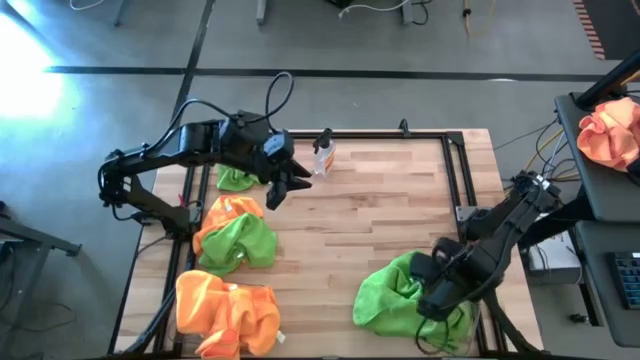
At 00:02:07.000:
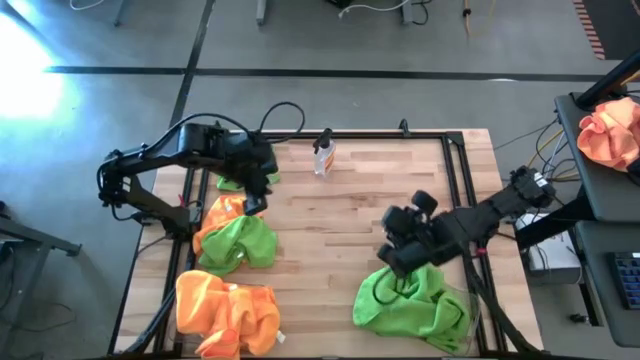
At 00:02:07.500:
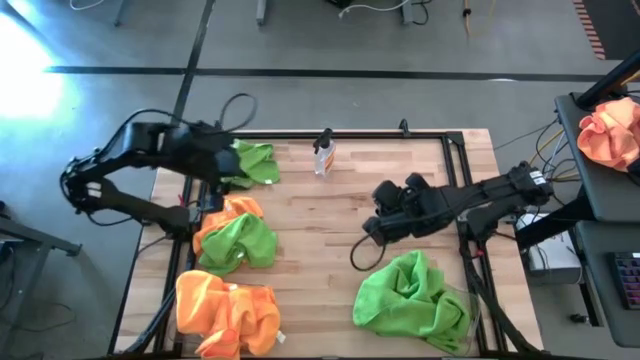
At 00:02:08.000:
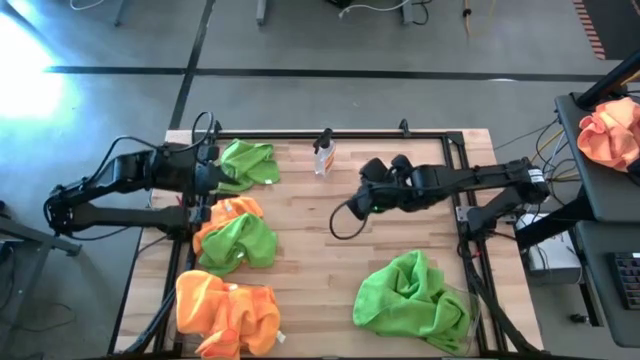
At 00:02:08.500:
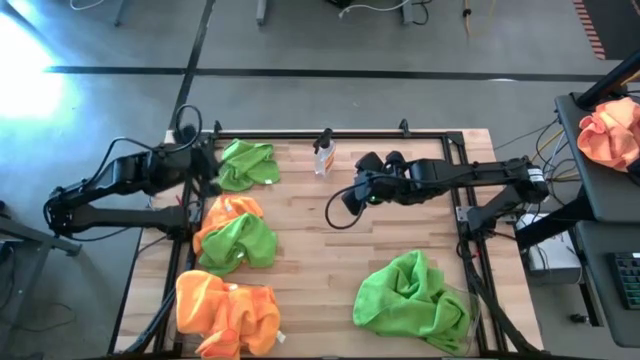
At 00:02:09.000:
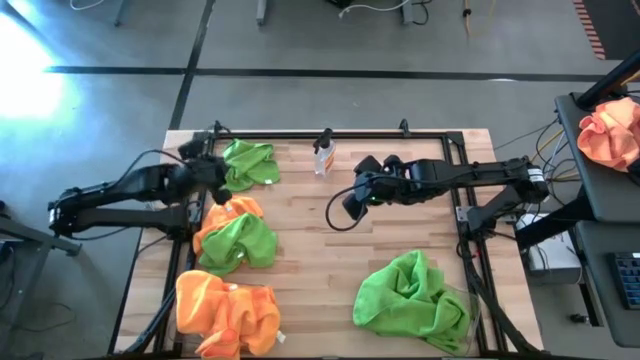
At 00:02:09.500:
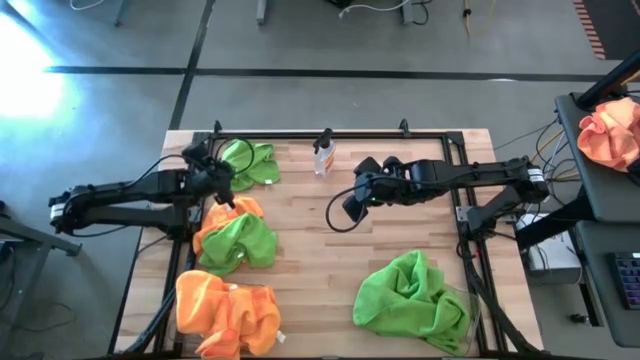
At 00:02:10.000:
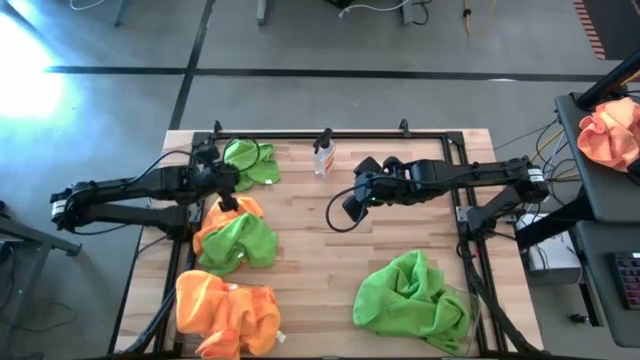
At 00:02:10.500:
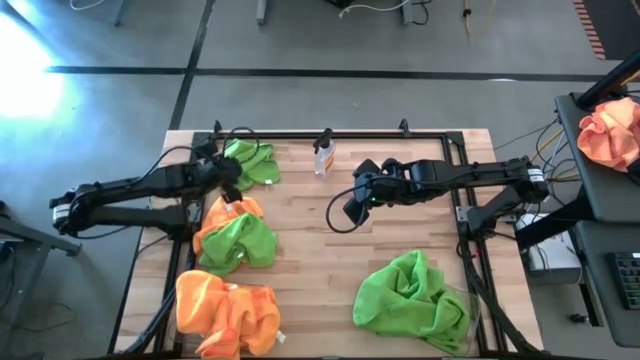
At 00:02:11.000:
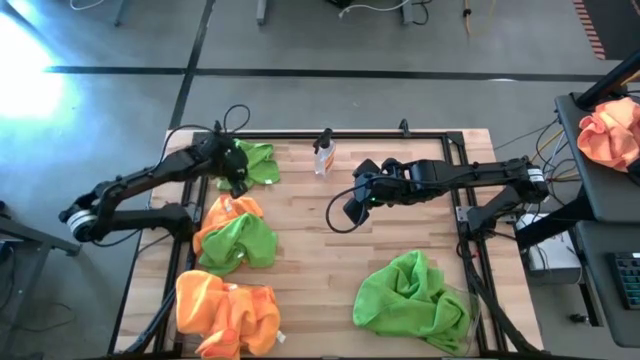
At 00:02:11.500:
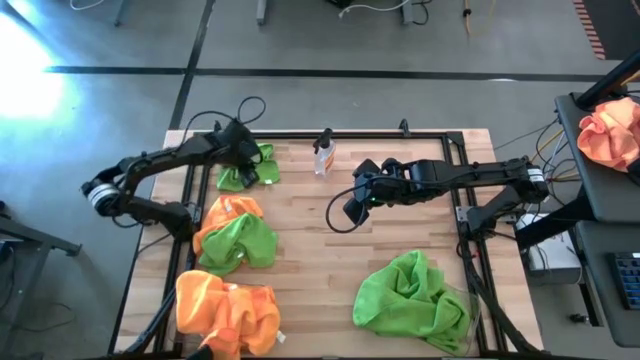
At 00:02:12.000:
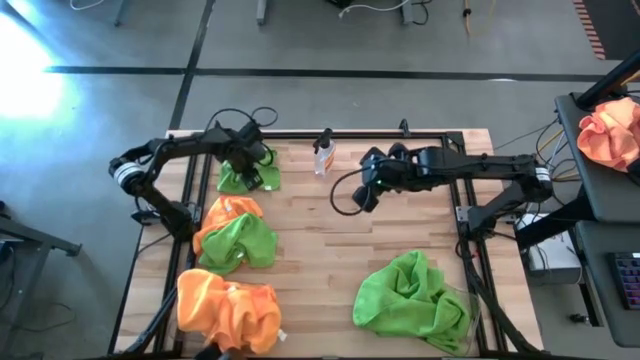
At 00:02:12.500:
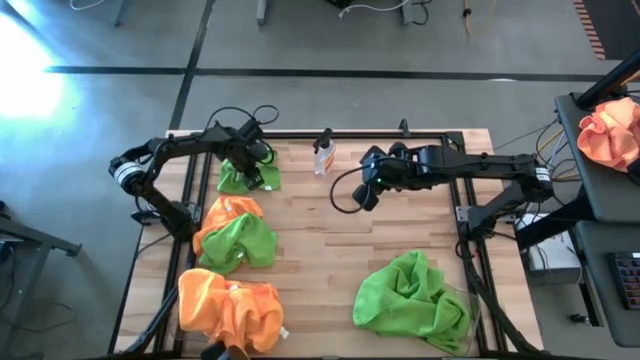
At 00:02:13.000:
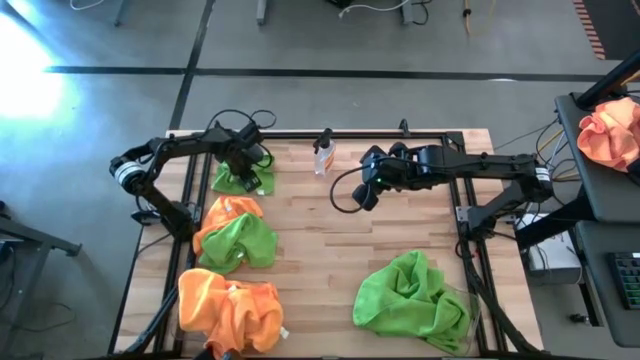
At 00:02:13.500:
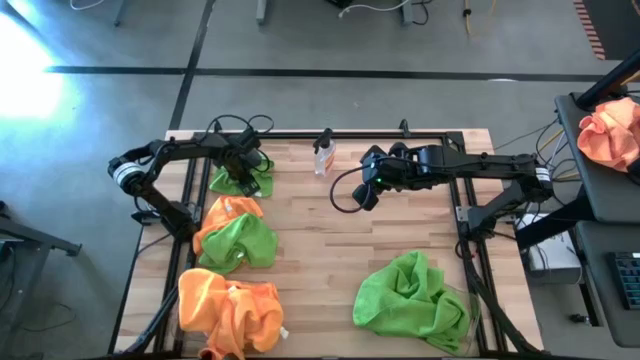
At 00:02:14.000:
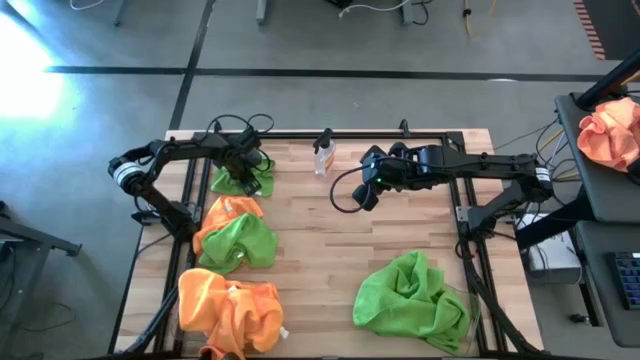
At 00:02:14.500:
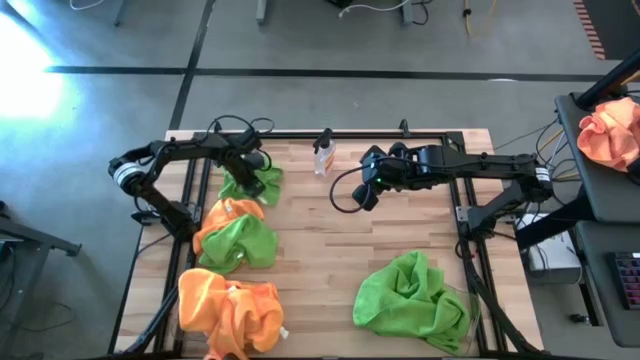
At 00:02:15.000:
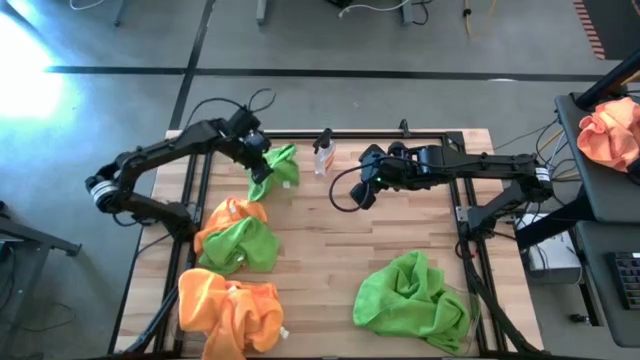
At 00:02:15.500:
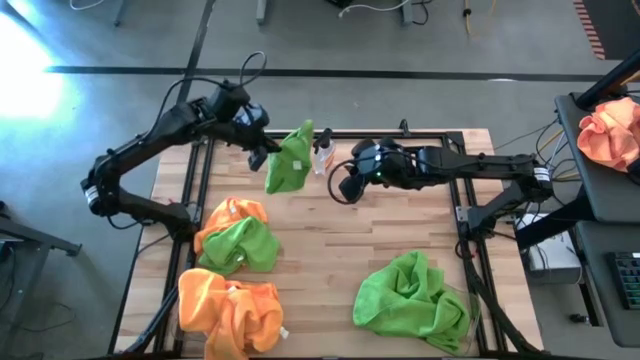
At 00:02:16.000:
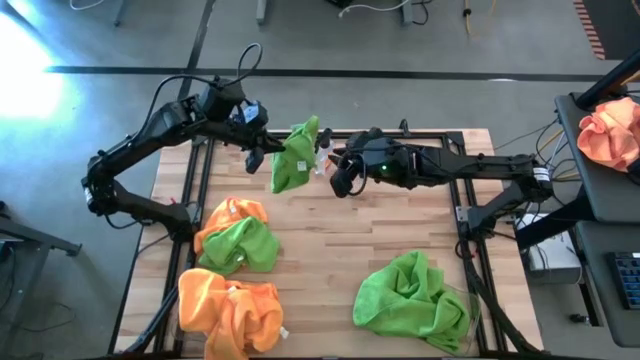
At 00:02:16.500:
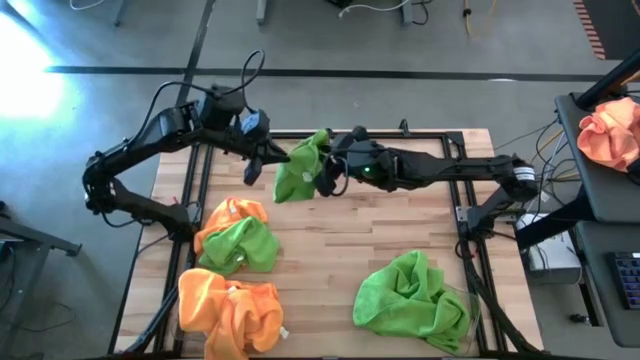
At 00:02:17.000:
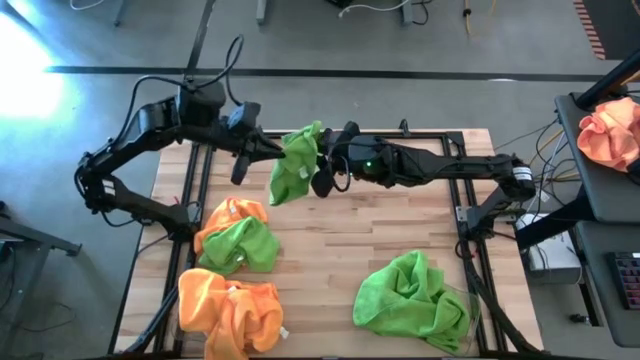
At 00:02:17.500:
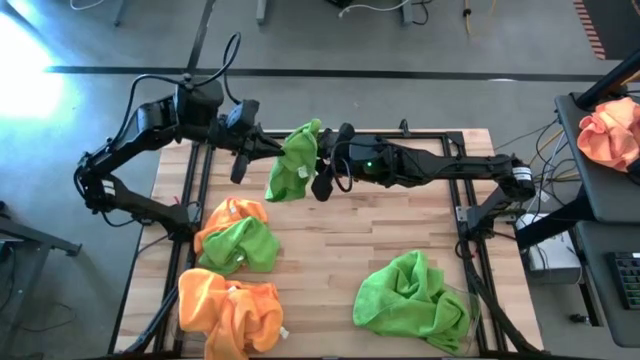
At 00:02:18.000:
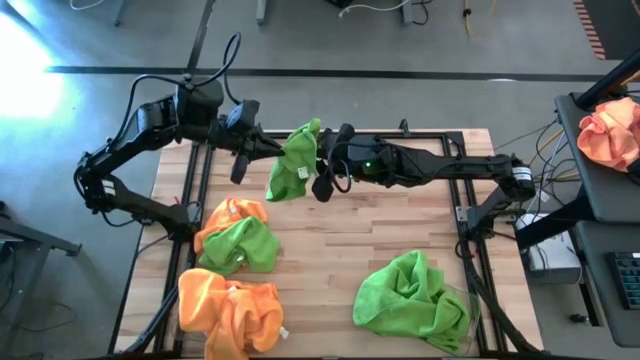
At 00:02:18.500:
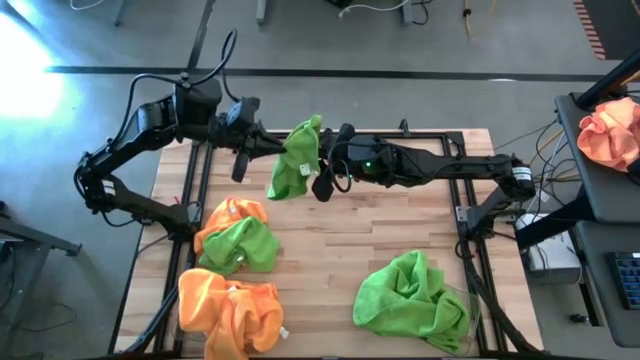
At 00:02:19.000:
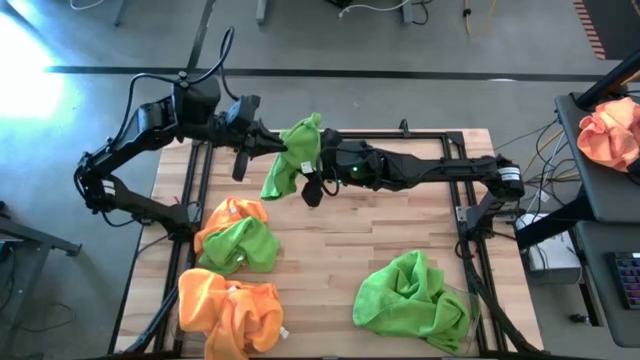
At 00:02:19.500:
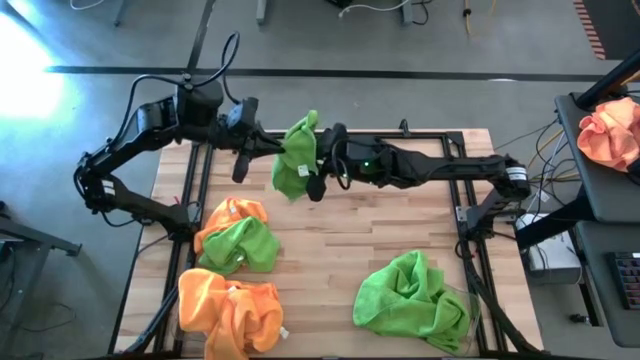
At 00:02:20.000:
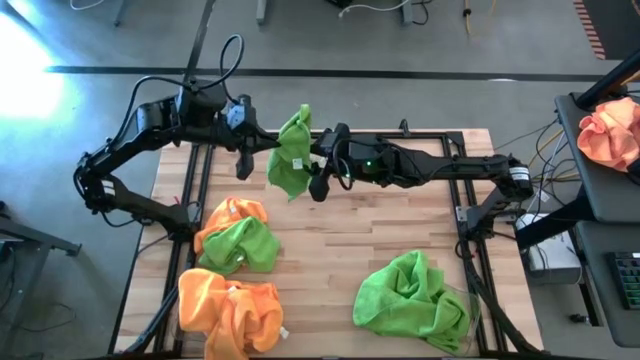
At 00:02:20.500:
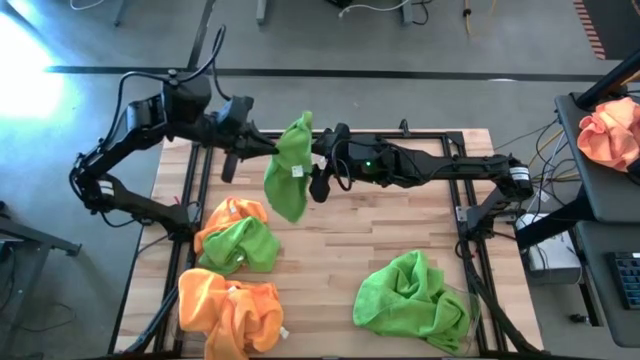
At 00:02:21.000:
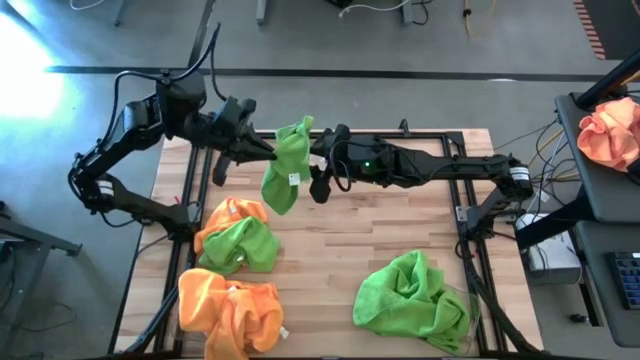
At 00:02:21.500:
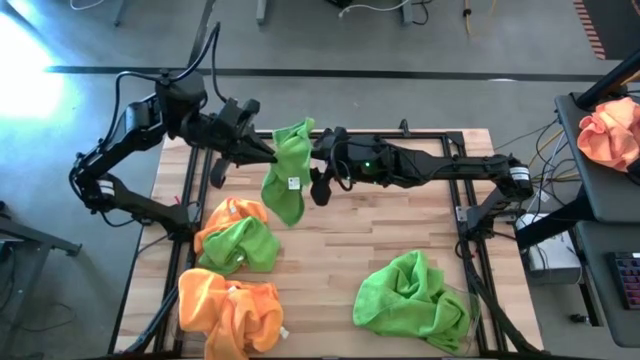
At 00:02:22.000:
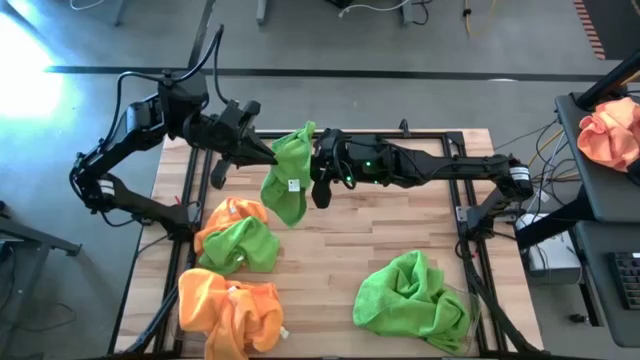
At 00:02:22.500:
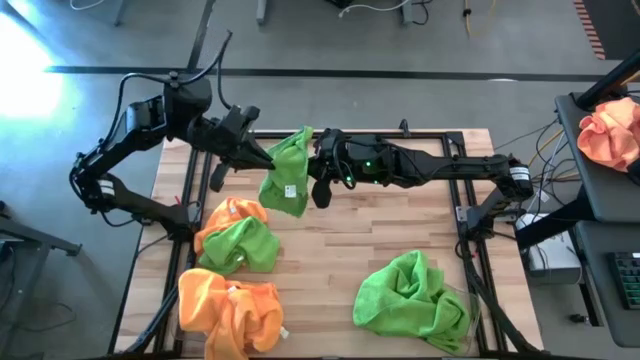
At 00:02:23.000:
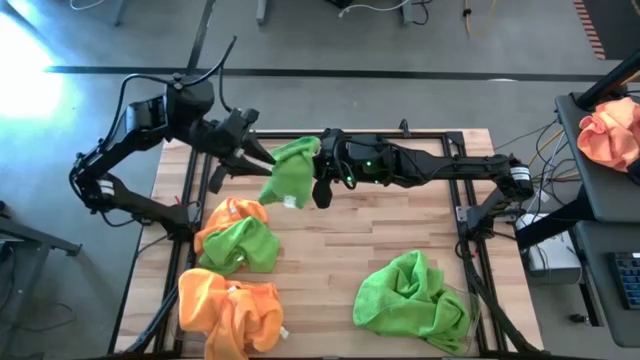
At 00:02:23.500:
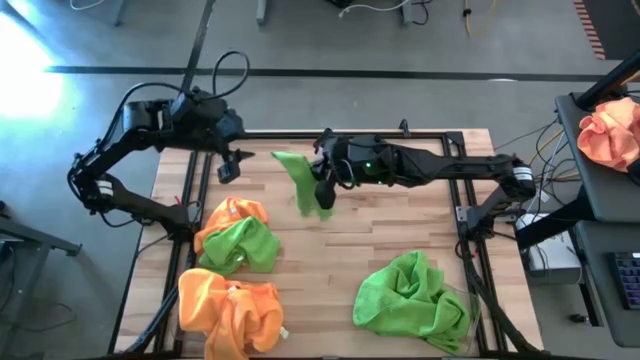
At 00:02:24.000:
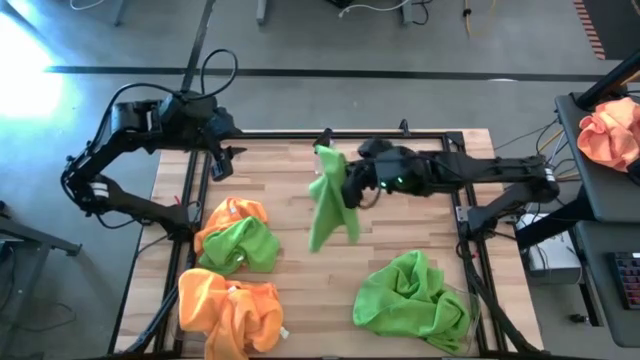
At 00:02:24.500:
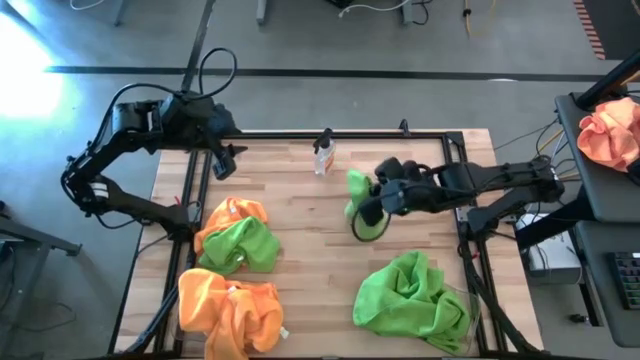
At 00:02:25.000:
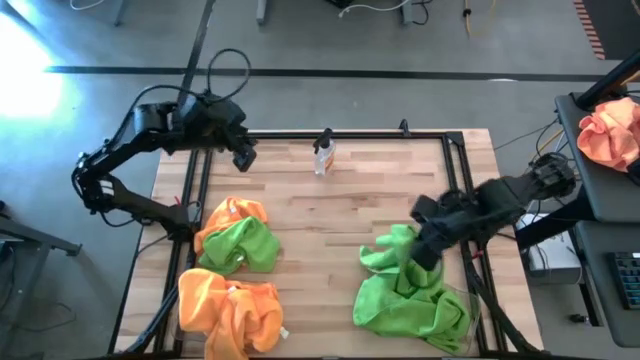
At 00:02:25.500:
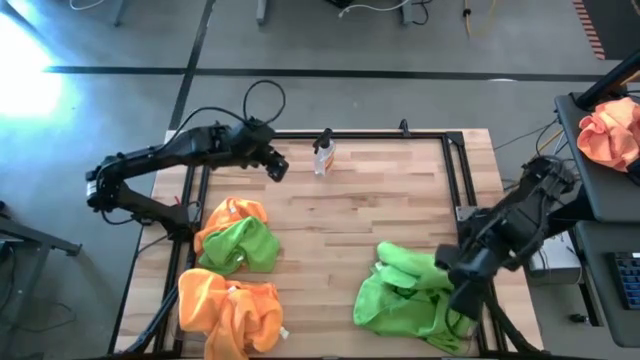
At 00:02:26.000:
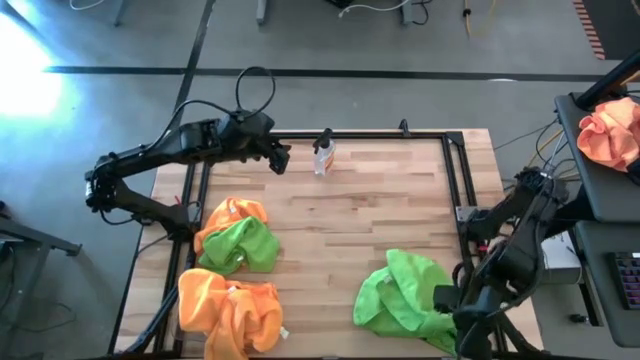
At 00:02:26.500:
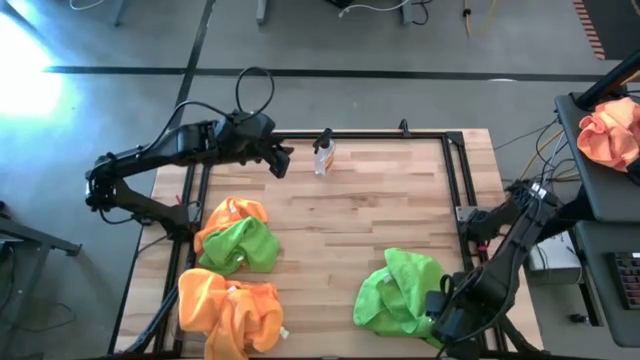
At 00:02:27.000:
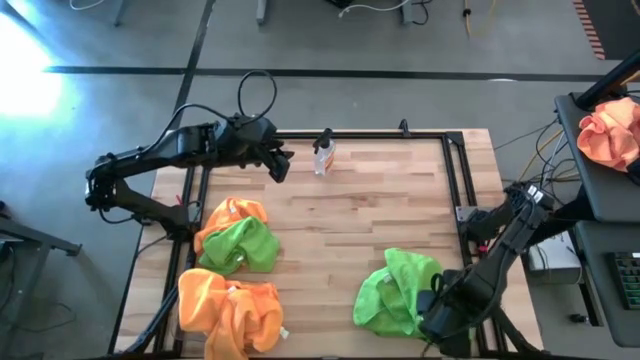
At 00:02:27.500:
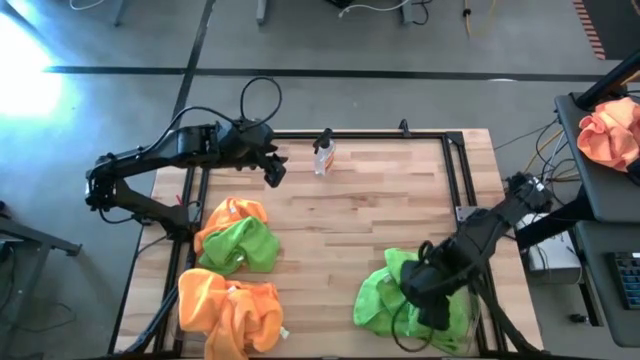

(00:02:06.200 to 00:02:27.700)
Task: Sort microfiber towel by color & place in baskets
Put the green microfiber cloth into the right transparent bin
